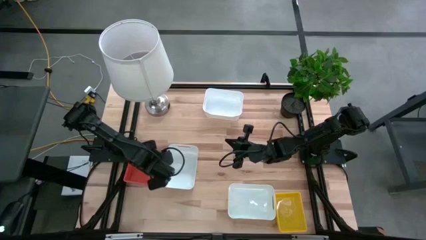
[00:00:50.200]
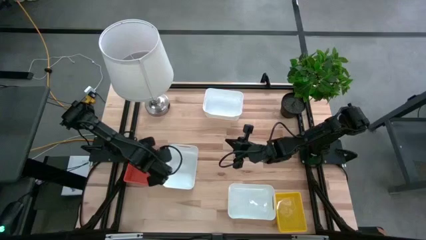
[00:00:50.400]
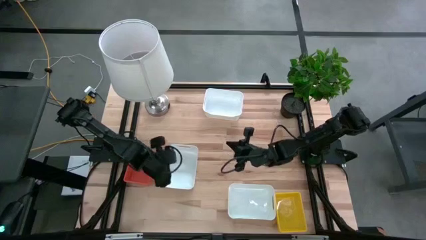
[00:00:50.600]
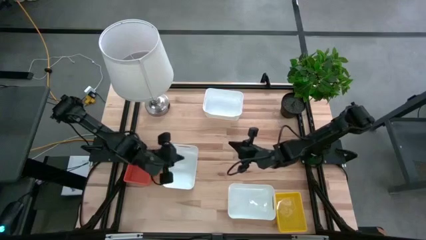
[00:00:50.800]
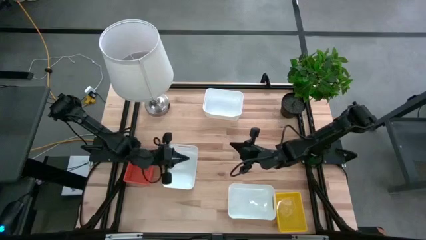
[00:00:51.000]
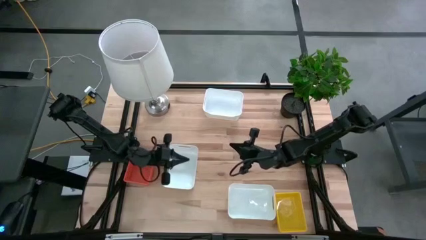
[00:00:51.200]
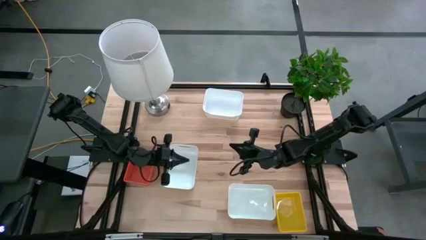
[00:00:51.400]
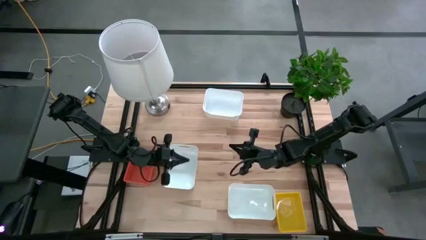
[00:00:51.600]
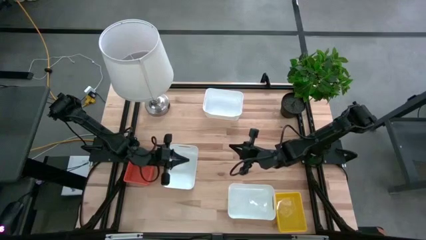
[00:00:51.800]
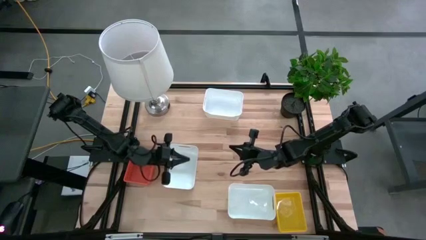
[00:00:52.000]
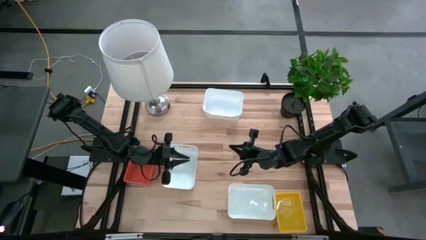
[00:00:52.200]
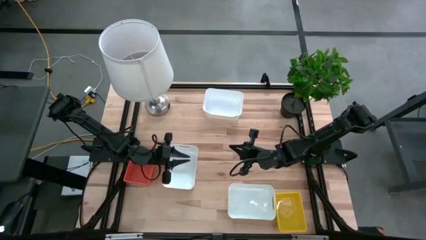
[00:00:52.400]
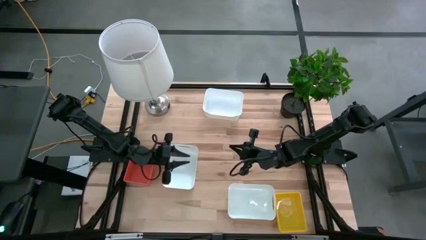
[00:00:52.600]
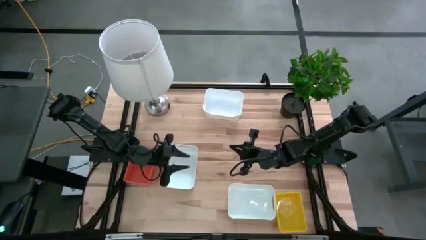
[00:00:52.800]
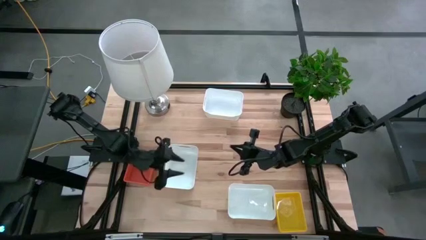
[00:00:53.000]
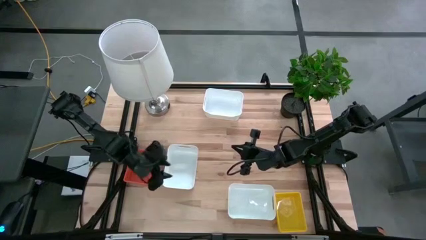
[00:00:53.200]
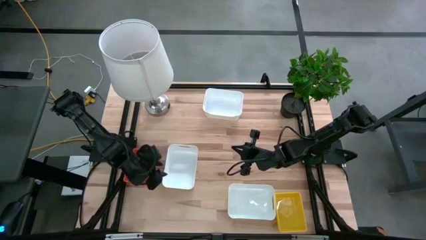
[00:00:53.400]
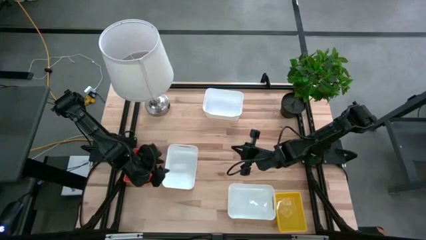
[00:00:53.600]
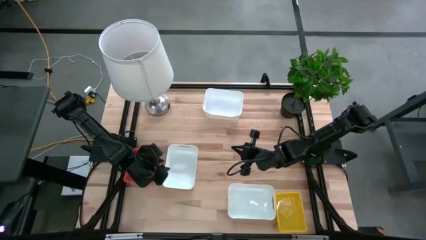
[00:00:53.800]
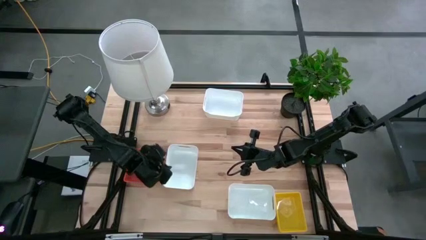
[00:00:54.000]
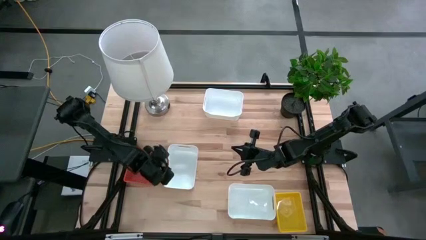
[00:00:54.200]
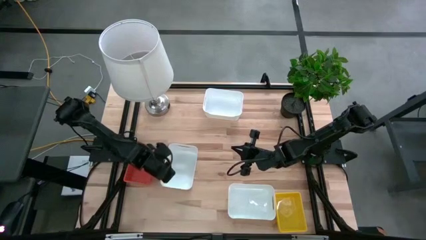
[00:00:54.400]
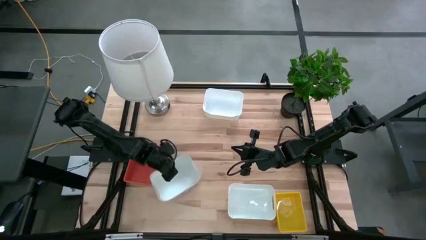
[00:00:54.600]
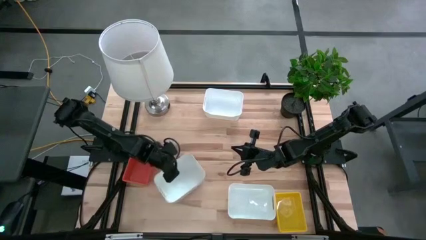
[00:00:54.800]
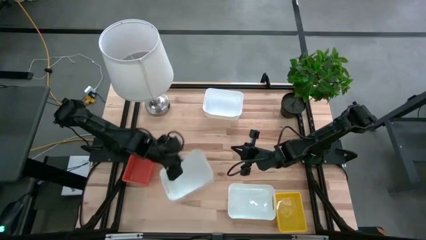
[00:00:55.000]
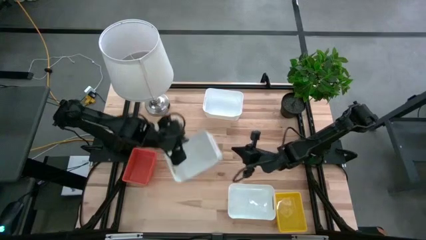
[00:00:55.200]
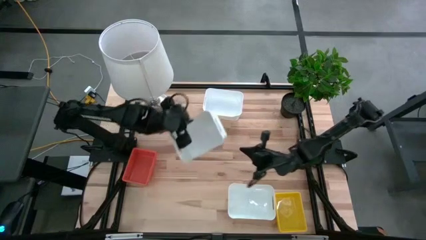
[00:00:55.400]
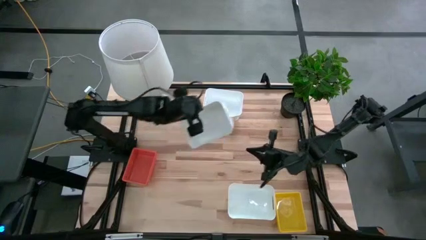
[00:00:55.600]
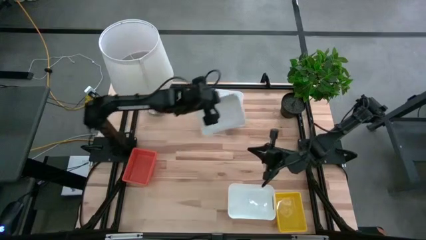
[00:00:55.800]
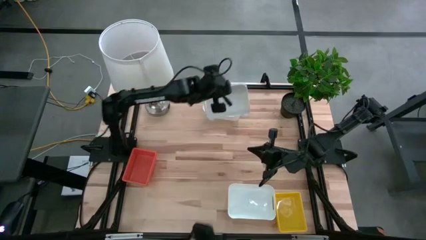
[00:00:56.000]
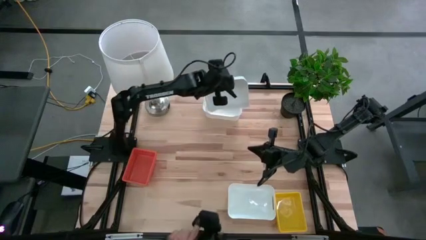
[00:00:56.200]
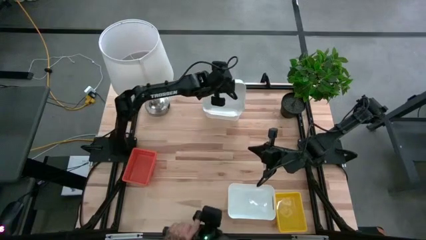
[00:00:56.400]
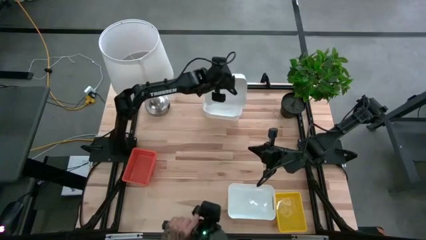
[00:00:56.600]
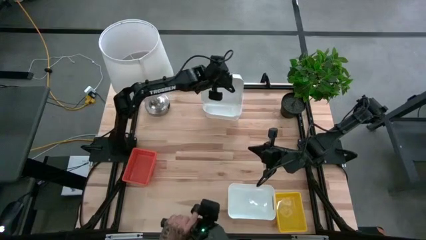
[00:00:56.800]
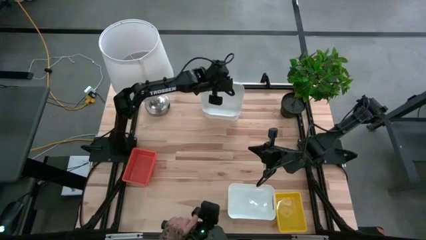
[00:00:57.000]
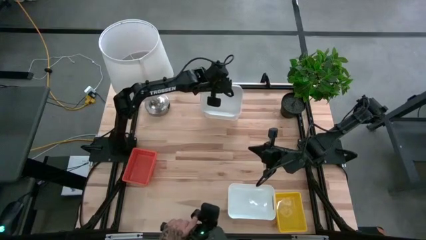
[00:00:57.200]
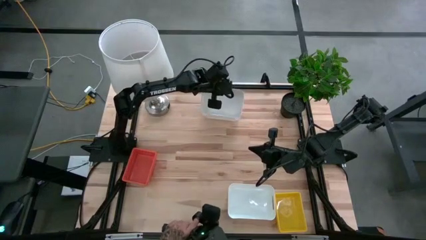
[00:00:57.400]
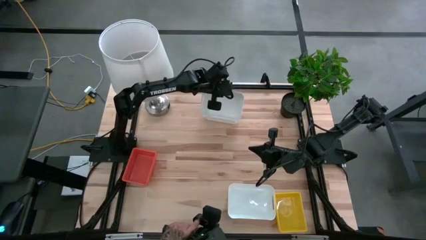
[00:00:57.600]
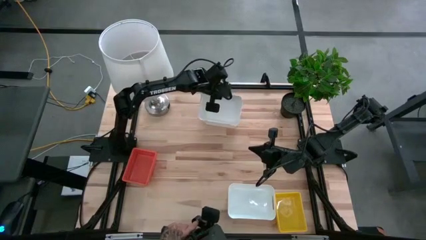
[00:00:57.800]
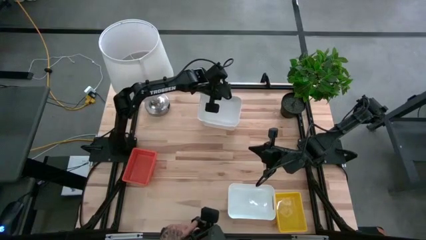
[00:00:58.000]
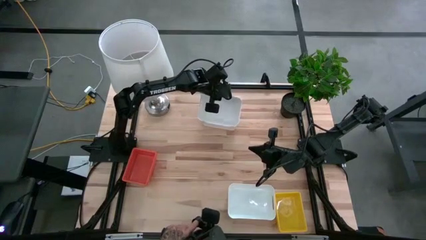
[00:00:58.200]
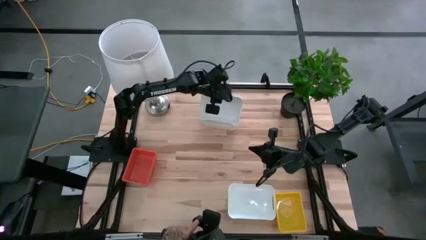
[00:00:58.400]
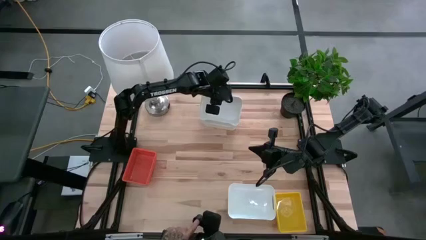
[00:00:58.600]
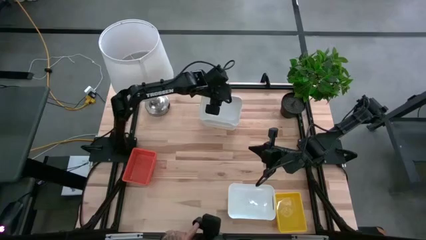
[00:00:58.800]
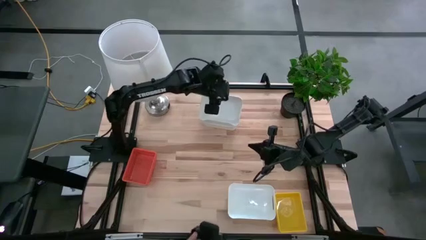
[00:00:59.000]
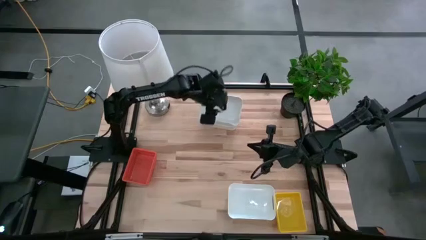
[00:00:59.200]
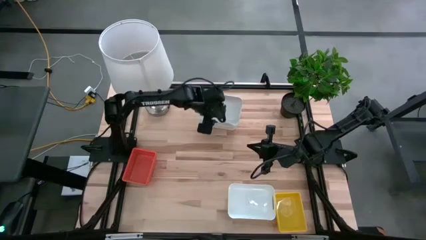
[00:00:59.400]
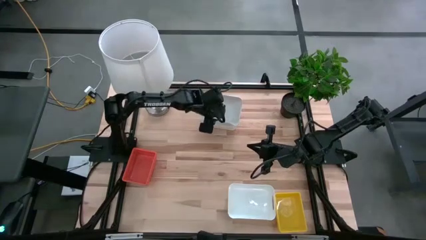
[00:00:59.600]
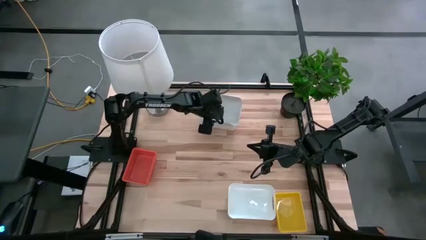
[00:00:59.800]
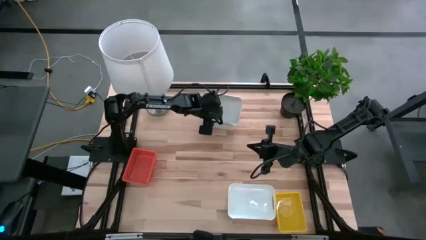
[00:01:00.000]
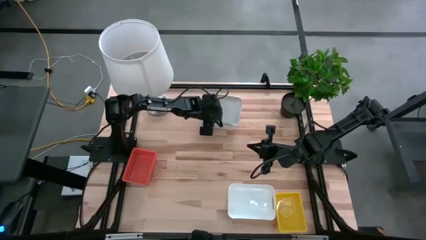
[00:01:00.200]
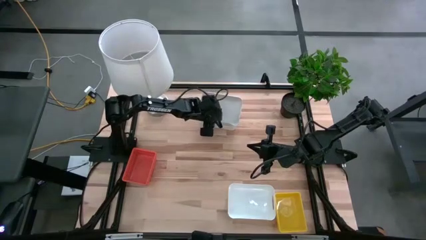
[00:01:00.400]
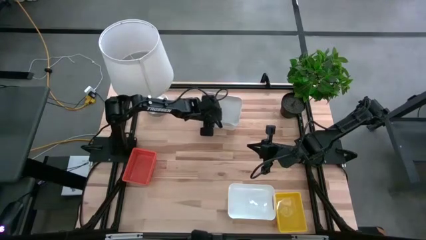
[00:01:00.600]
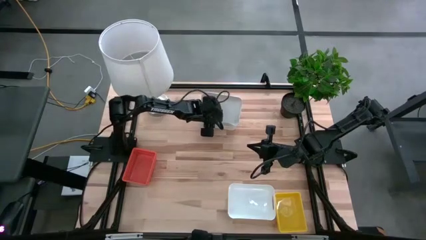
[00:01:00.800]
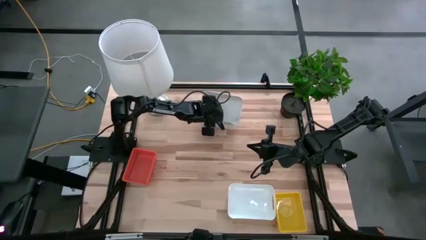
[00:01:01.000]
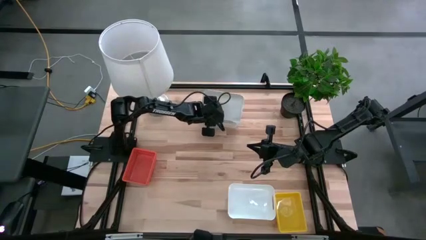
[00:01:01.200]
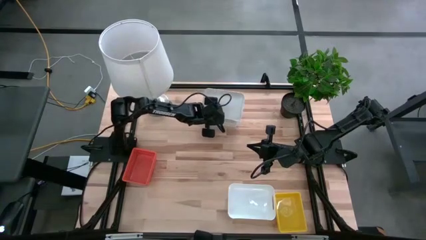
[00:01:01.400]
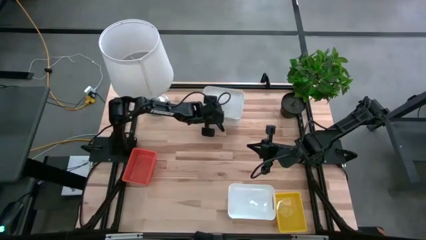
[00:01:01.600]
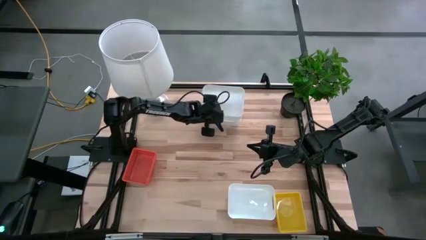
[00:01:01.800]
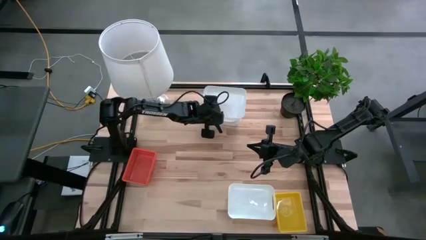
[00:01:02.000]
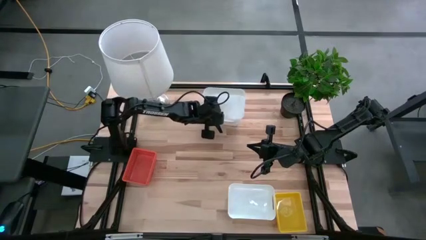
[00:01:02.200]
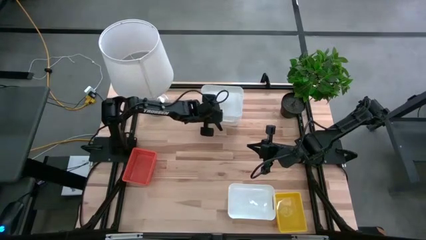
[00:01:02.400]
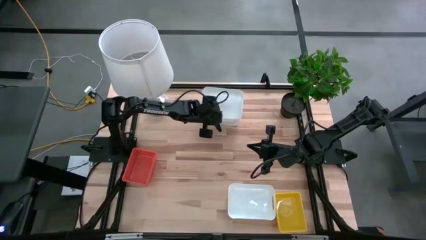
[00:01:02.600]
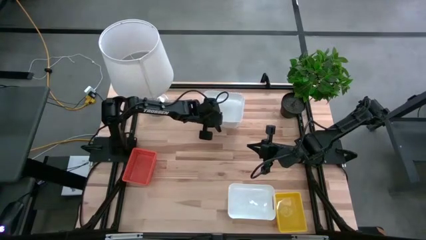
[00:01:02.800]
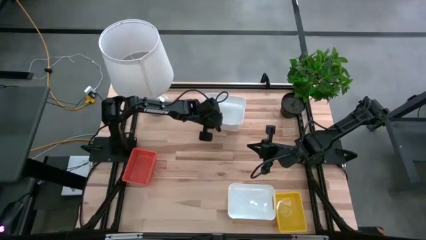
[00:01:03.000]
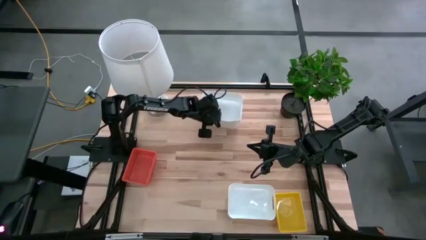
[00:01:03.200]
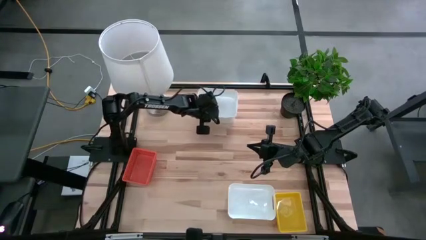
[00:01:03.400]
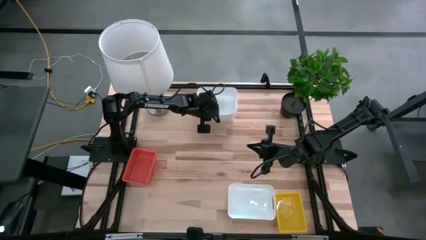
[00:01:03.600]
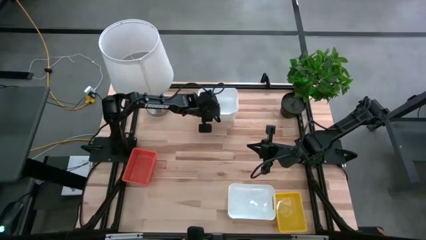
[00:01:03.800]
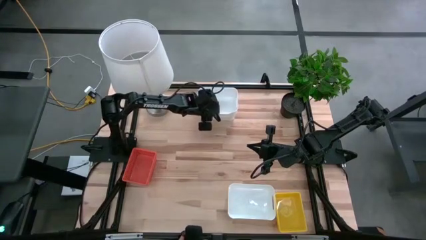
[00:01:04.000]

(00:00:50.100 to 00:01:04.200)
Stack the middle white bin on the top white bin

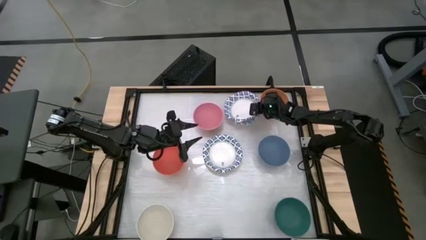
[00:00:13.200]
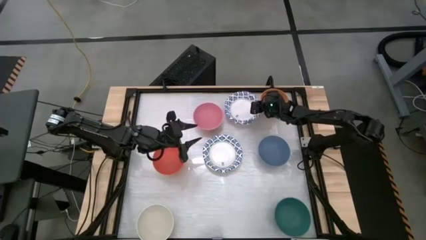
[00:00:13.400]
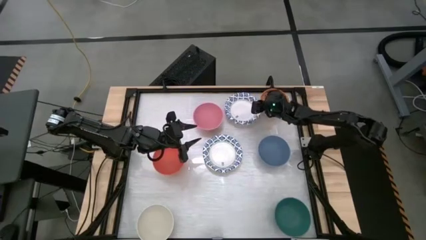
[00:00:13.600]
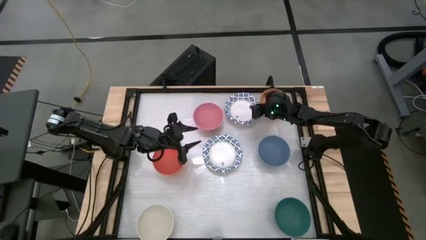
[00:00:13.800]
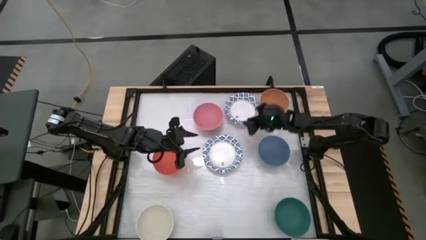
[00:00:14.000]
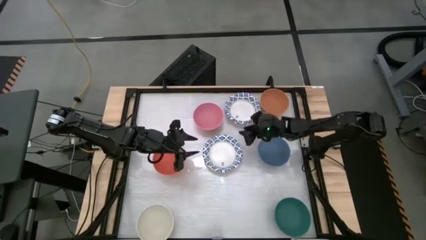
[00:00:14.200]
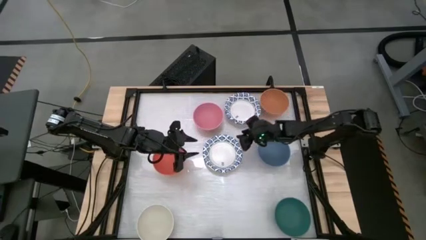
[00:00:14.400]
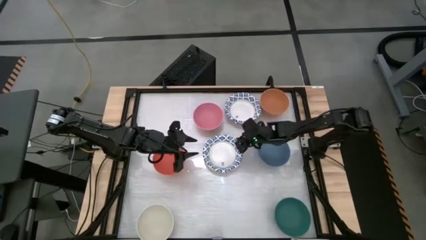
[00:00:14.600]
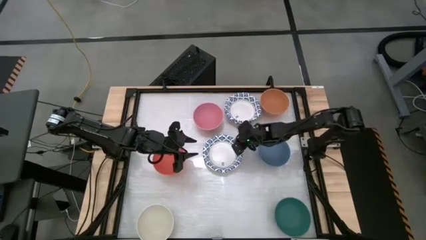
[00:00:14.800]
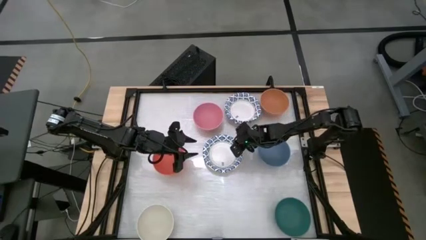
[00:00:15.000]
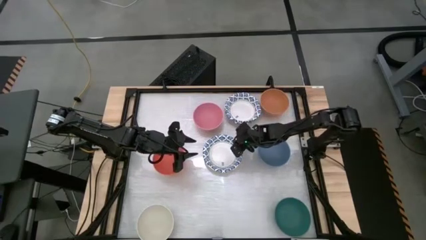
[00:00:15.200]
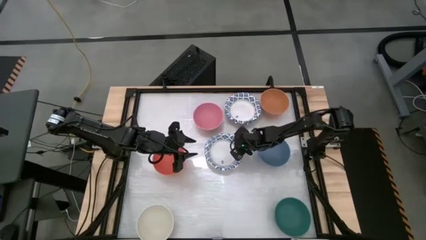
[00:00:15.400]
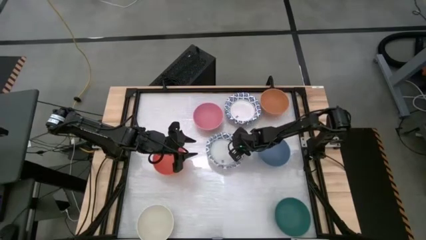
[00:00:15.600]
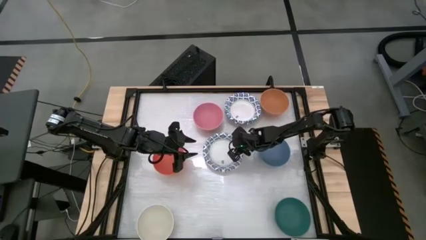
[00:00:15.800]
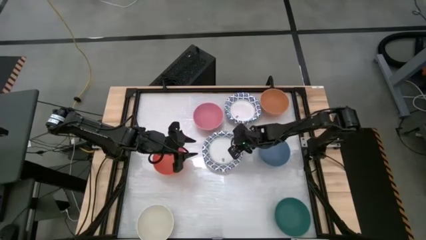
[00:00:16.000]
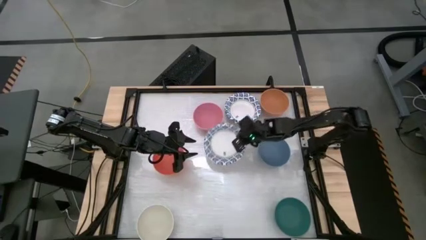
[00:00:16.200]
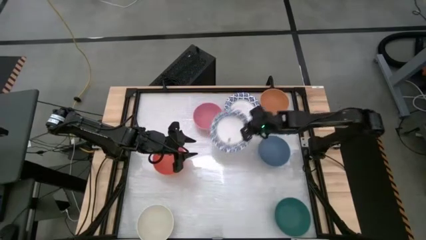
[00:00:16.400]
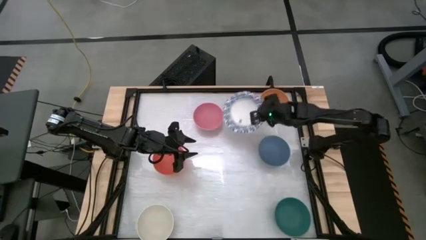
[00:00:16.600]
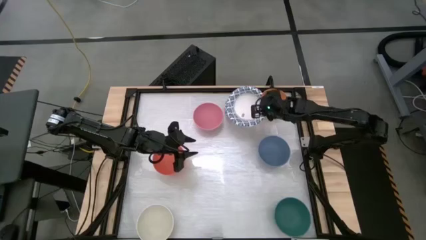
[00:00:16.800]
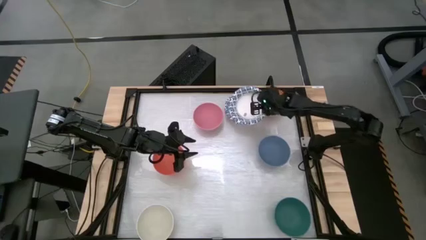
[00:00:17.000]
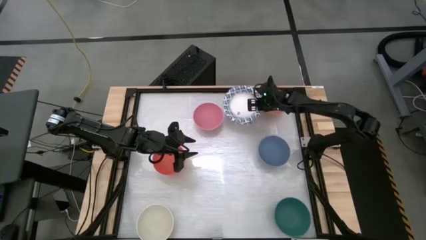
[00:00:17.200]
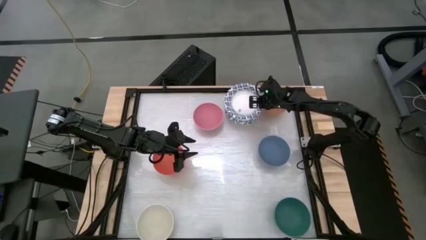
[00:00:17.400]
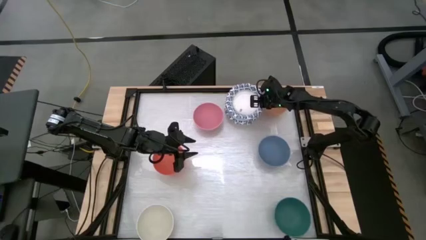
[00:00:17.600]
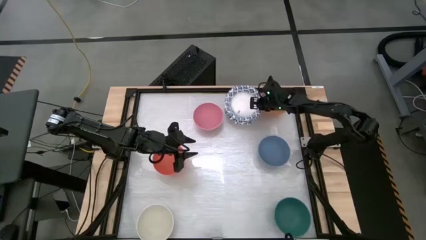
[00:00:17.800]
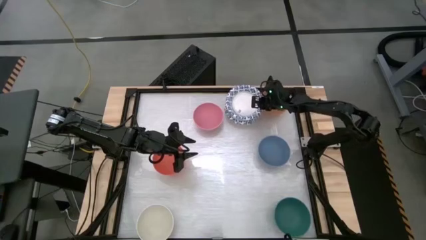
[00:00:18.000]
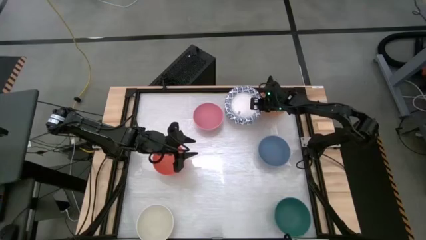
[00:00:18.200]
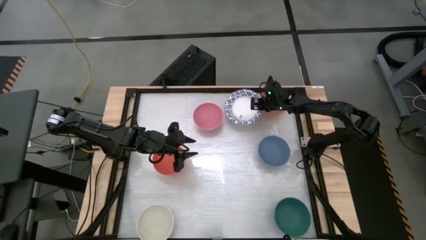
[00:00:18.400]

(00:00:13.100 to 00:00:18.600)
Stack the bottom white paper bowl into the top stacked white paper bowl
